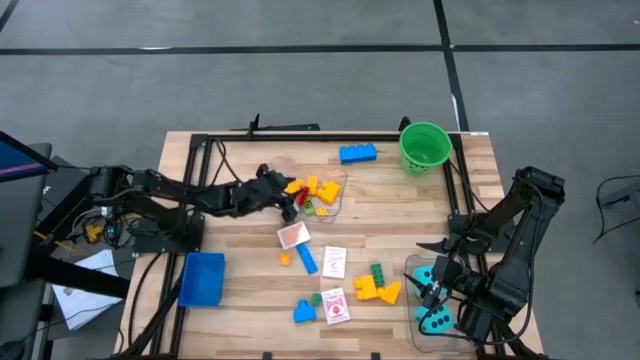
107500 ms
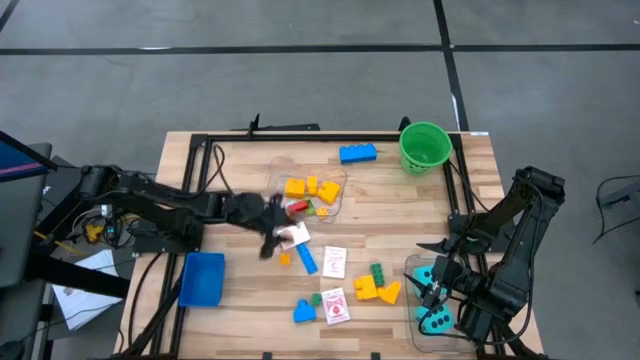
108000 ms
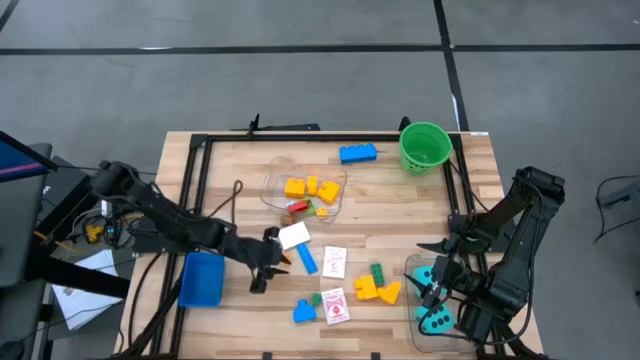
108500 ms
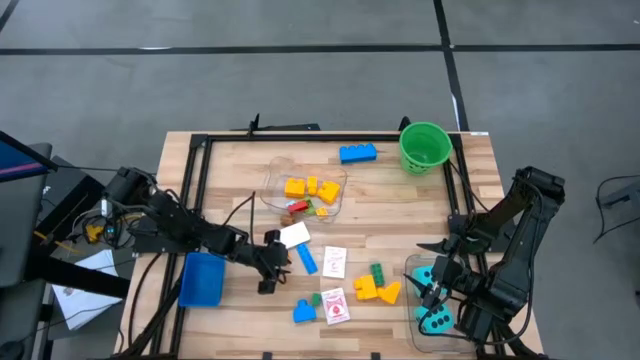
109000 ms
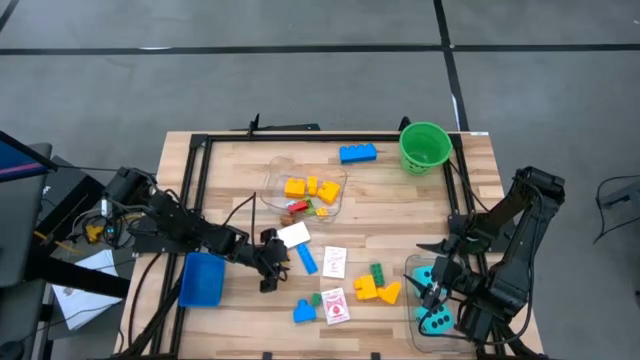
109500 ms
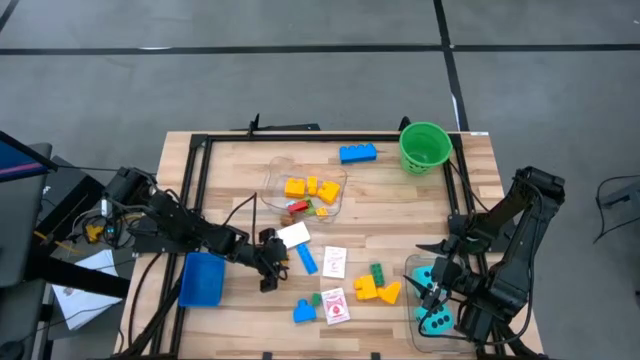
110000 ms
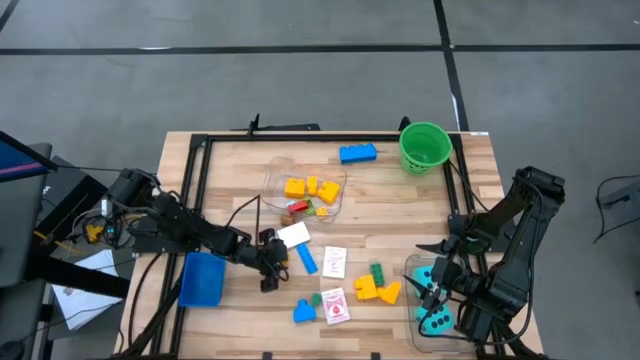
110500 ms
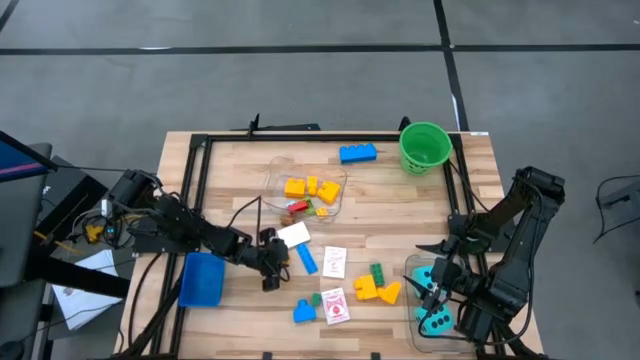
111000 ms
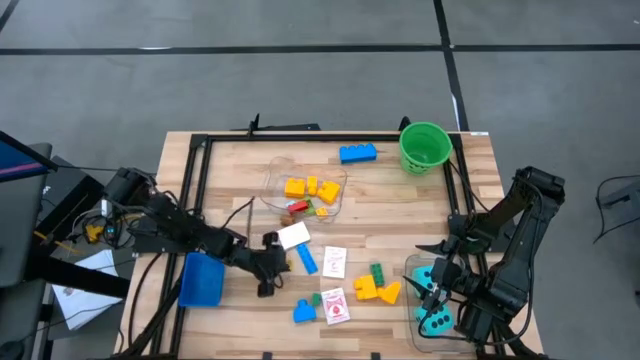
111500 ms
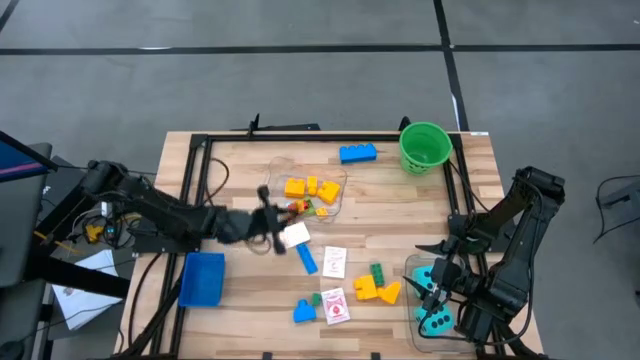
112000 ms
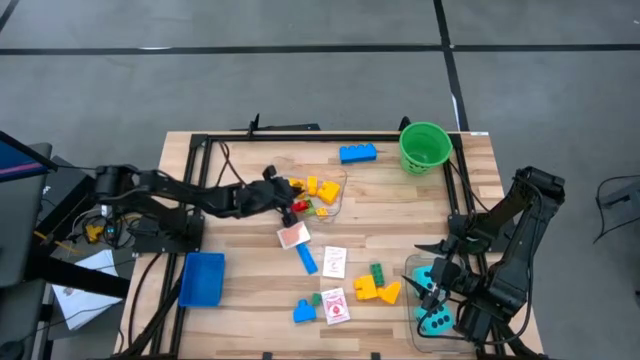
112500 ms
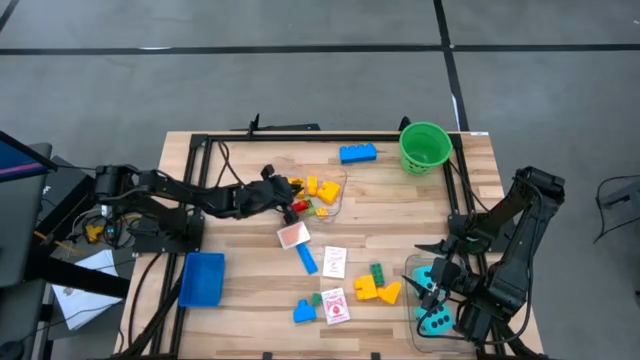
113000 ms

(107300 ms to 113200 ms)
Task: Pick & Place Toys
Put the yellow game piece into the top transparent bin

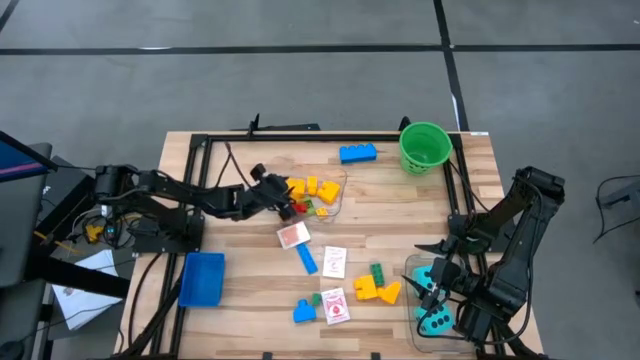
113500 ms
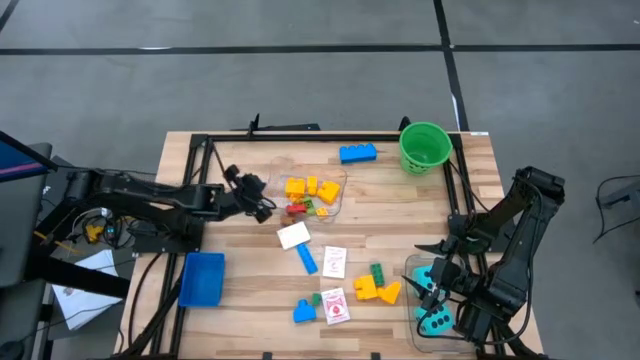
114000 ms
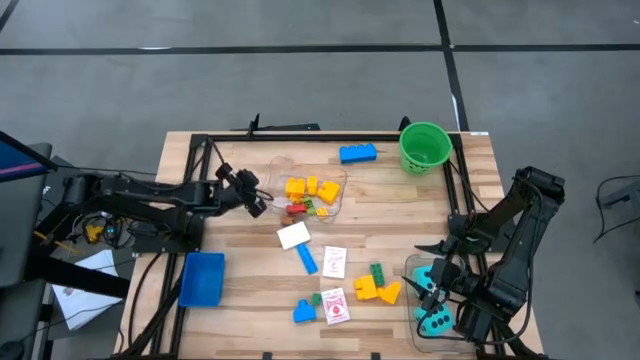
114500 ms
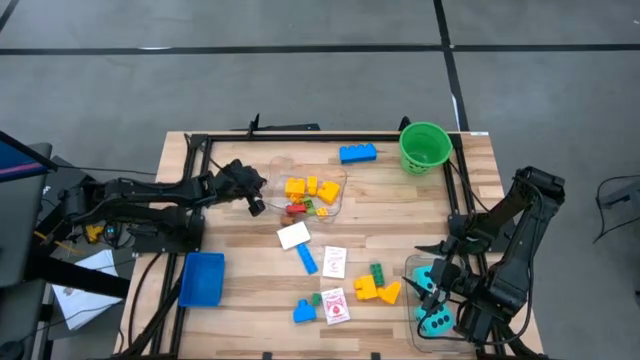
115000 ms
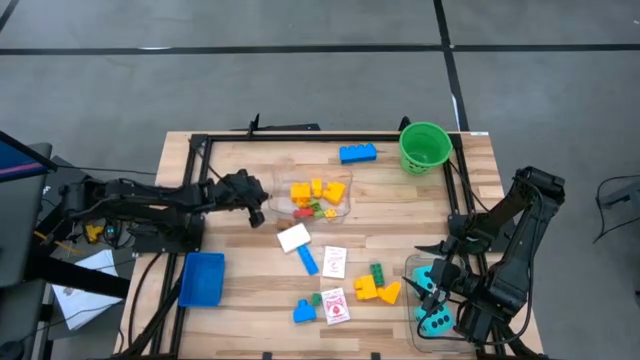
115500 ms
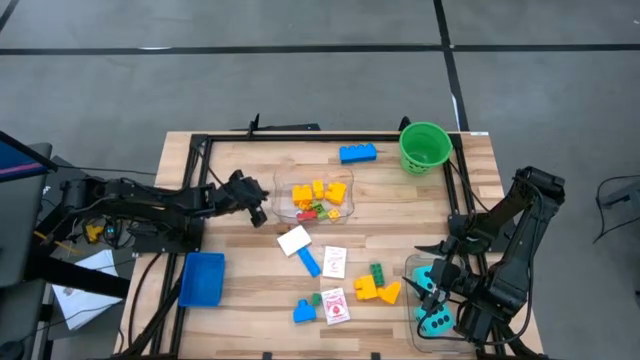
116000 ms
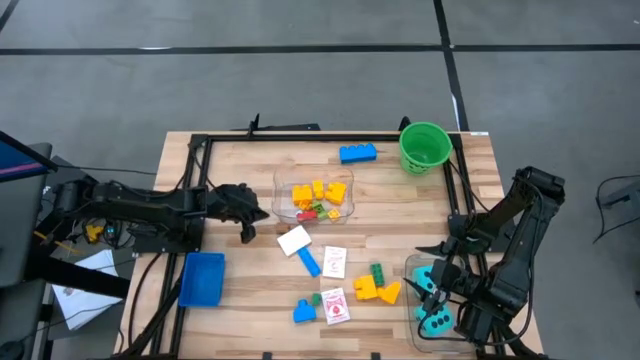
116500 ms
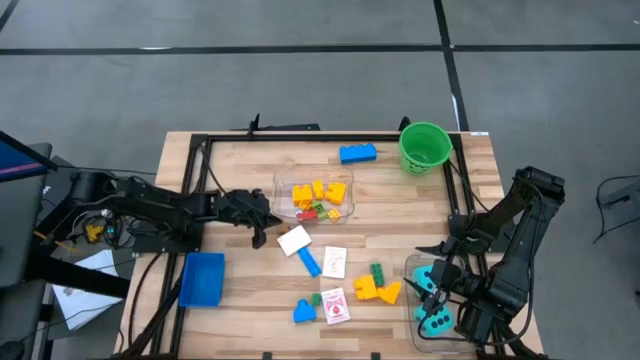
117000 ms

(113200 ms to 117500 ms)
Adjust the top transparent bin on the table

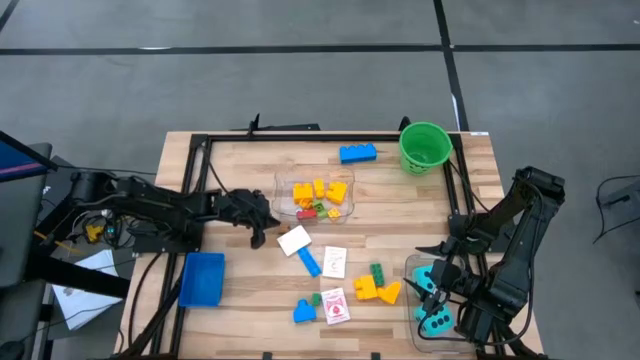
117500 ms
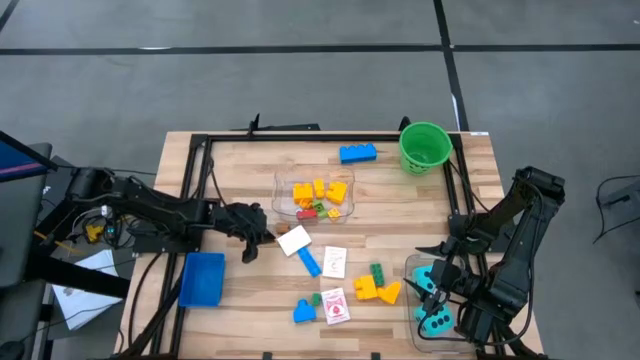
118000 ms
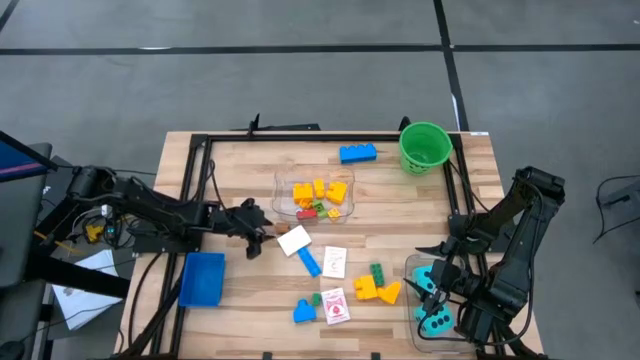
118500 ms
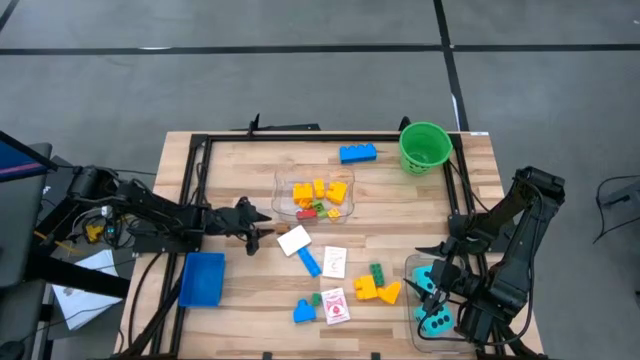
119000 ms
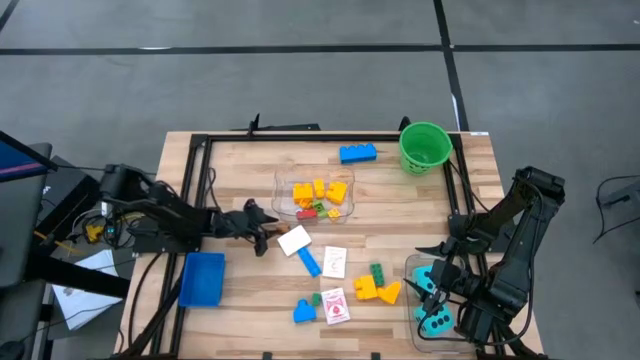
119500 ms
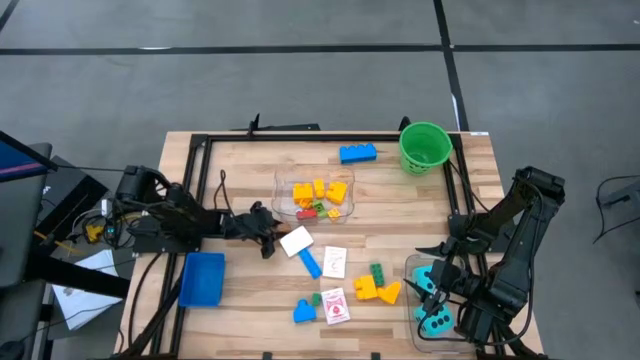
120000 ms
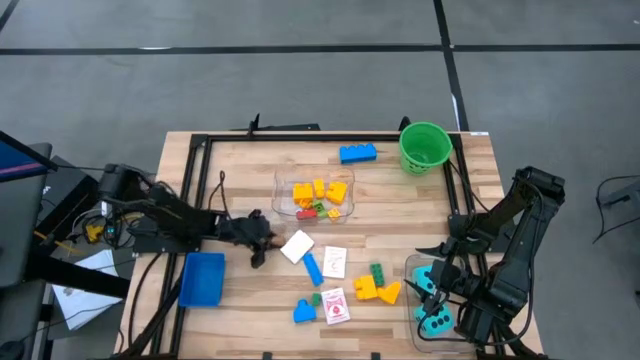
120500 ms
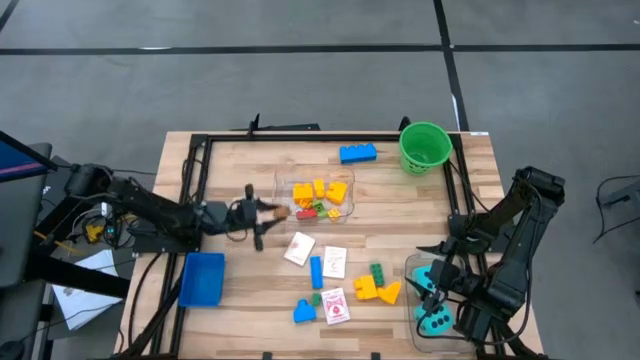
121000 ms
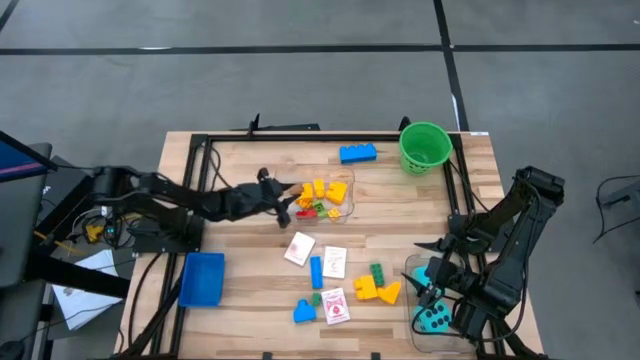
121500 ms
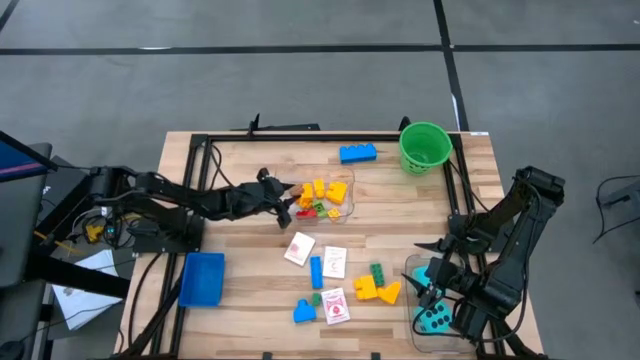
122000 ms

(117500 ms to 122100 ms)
Put the brown game piece into the top transparent bin

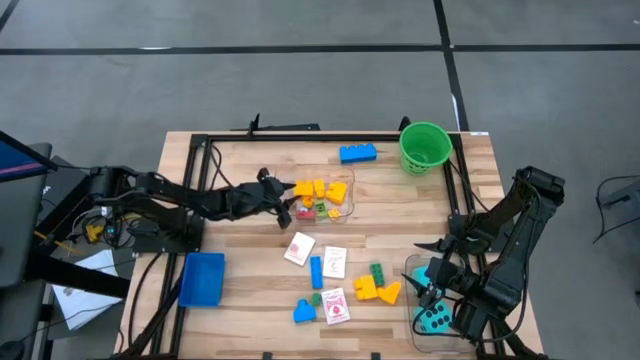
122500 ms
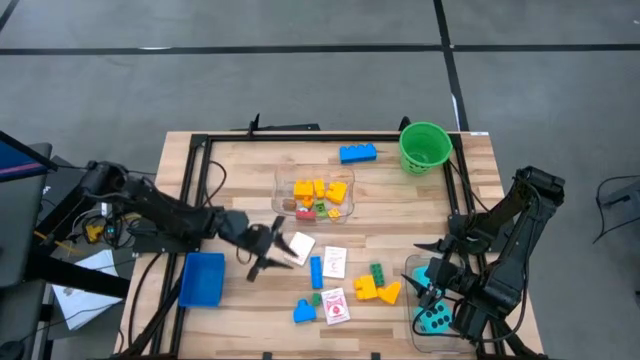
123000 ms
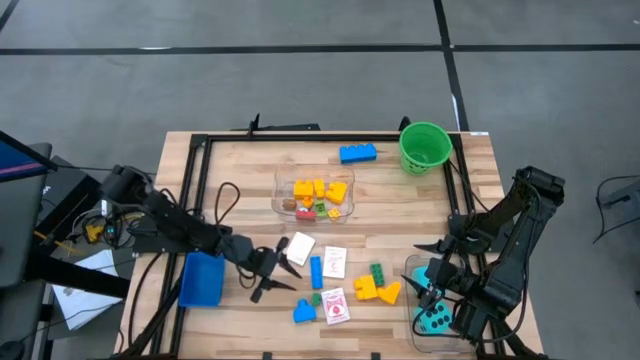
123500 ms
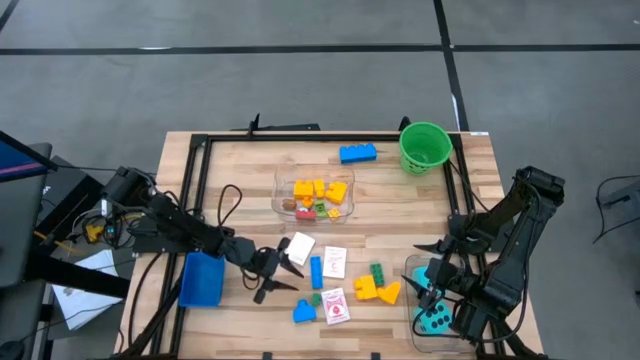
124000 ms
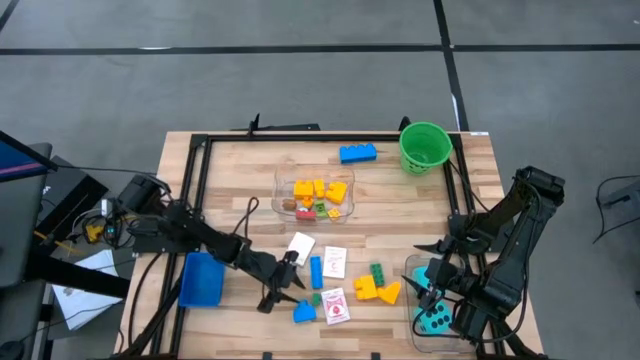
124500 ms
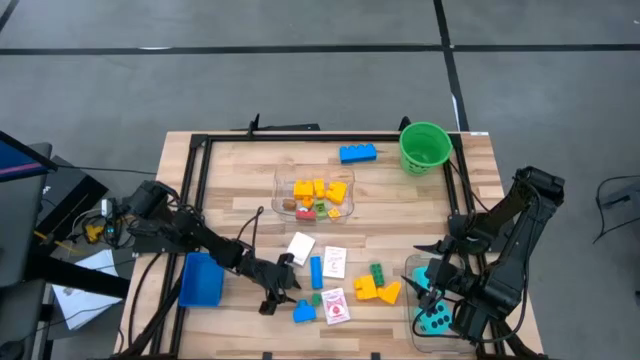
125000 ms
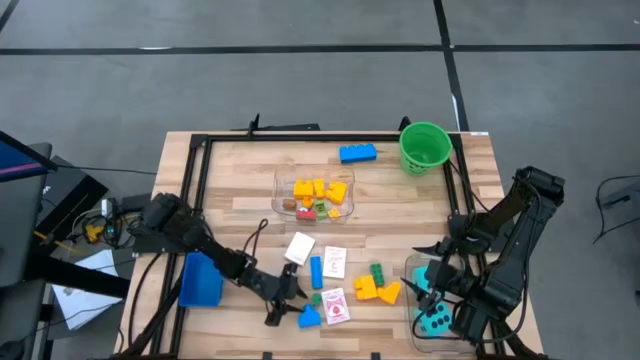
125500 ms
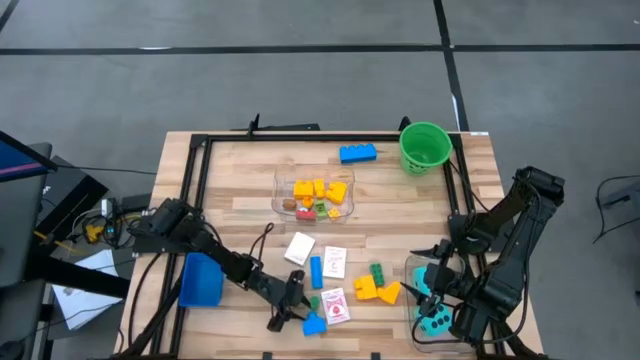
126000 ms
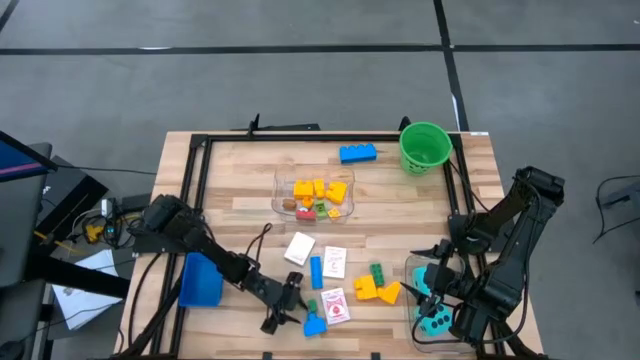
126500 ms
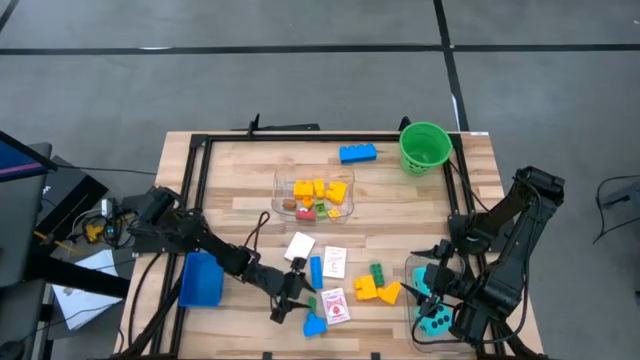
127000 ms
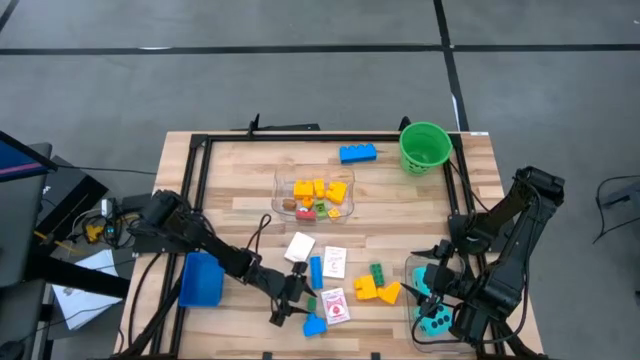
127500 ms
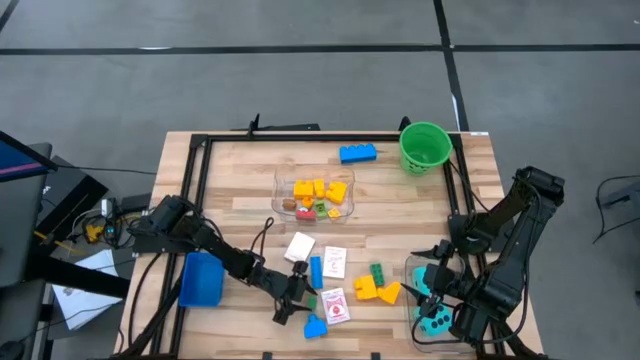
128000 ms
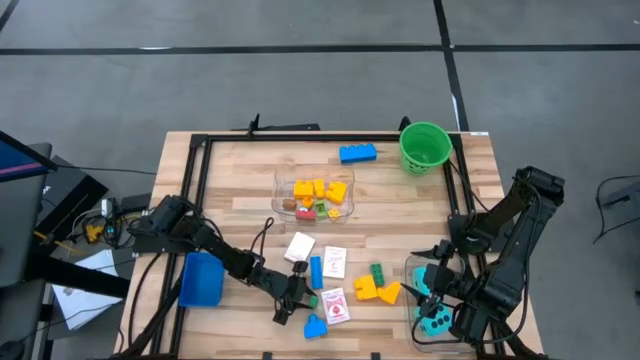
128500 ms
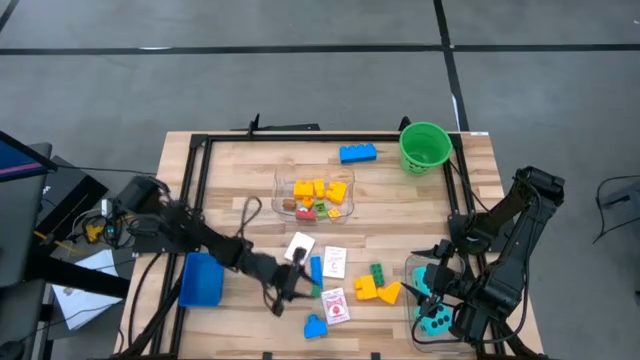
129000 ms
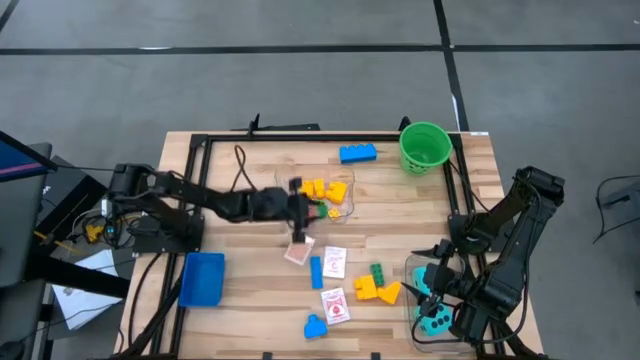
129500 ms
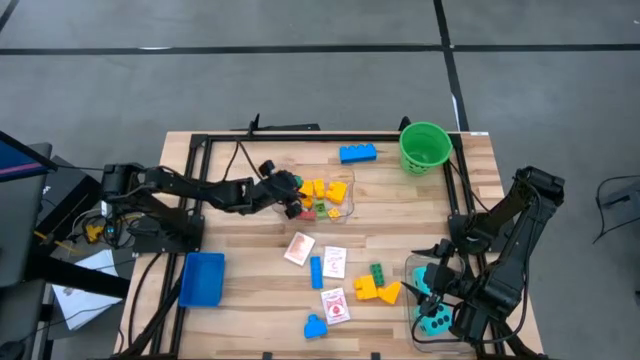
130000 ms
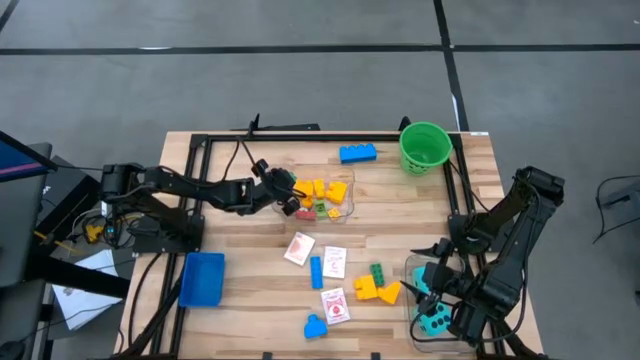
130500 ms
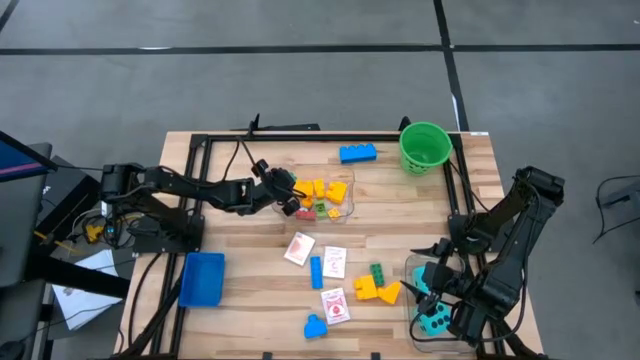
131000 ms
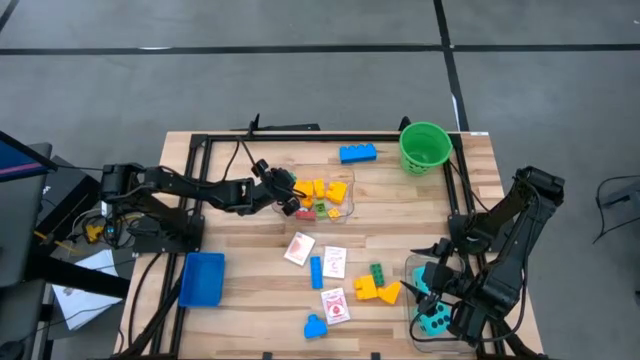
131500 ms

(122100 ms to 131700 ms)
Put the green game piece into the top transparent bin
